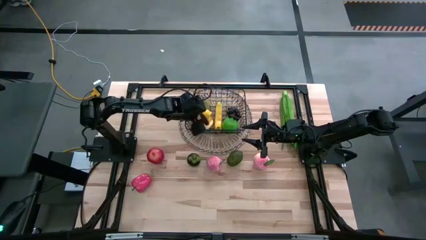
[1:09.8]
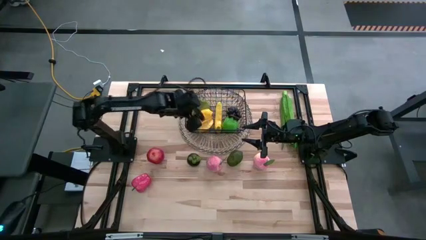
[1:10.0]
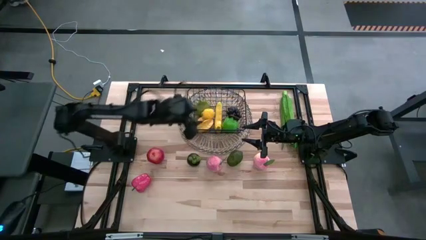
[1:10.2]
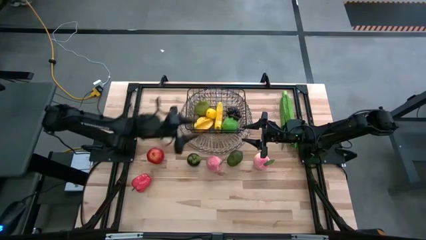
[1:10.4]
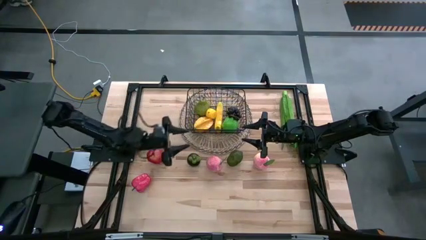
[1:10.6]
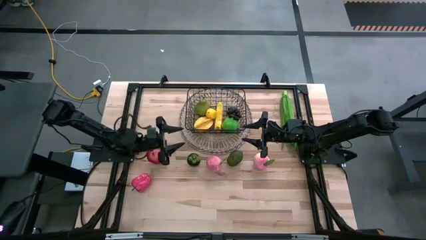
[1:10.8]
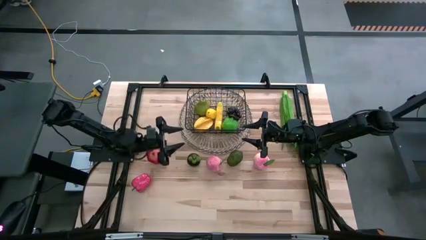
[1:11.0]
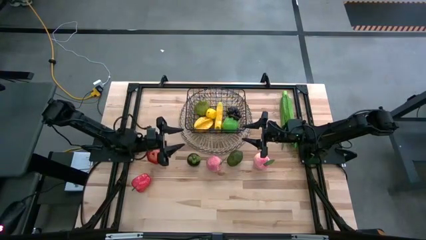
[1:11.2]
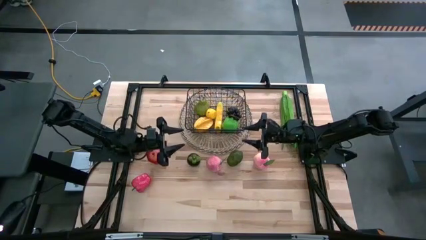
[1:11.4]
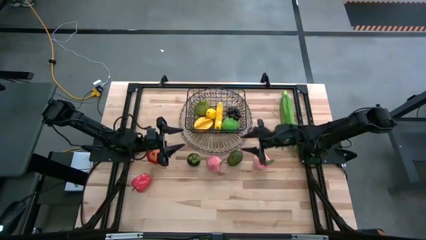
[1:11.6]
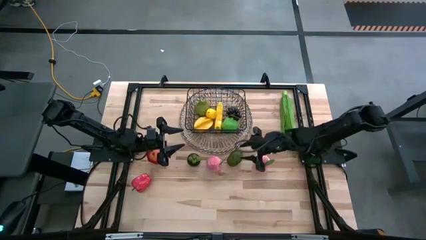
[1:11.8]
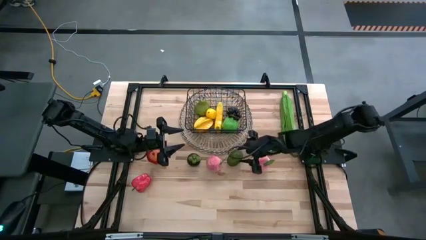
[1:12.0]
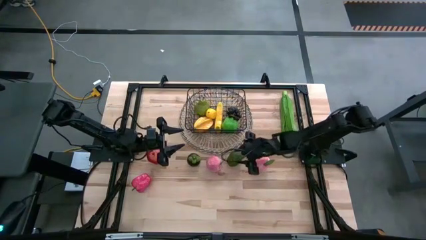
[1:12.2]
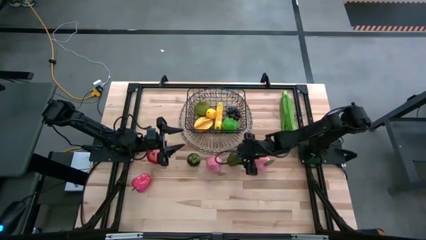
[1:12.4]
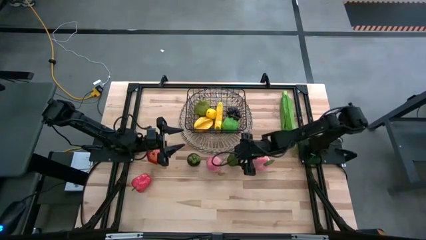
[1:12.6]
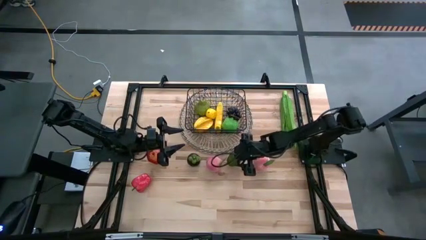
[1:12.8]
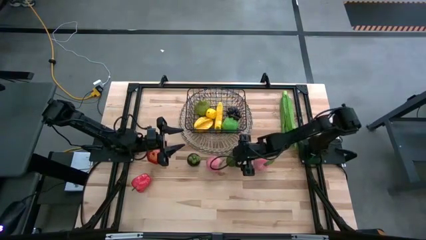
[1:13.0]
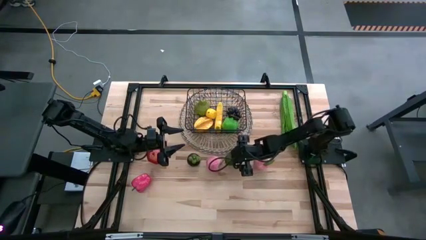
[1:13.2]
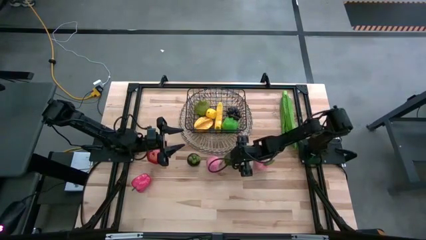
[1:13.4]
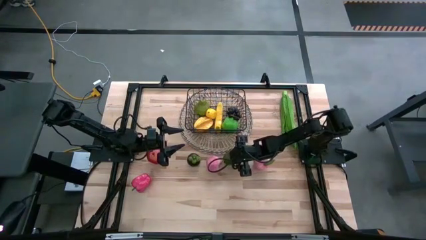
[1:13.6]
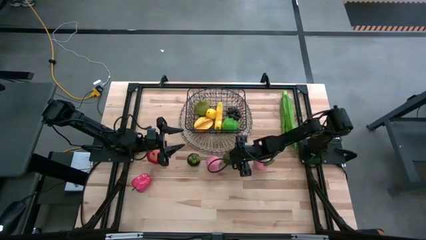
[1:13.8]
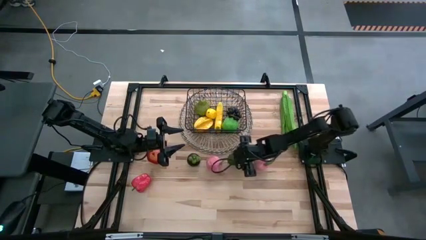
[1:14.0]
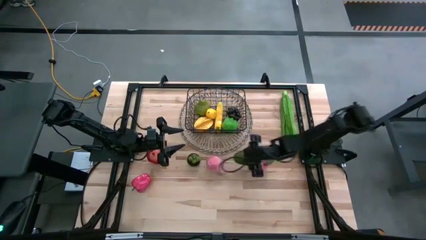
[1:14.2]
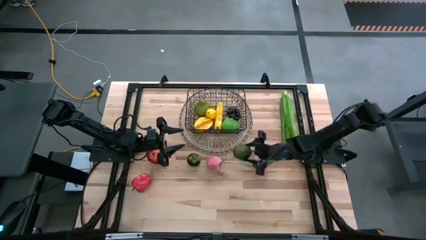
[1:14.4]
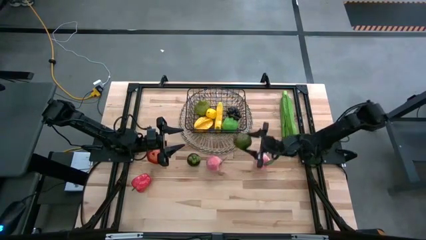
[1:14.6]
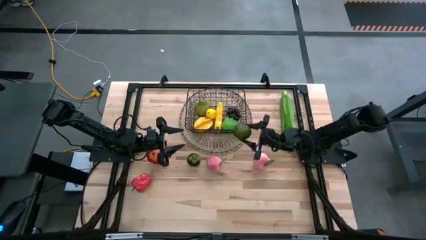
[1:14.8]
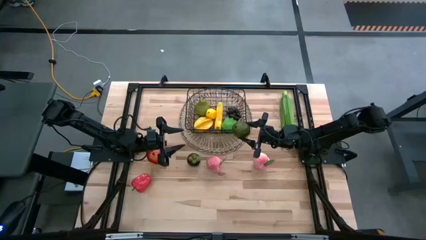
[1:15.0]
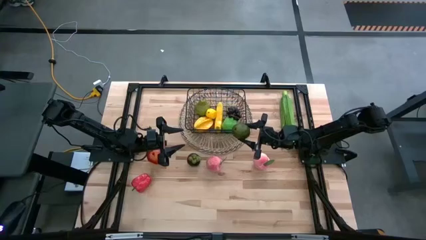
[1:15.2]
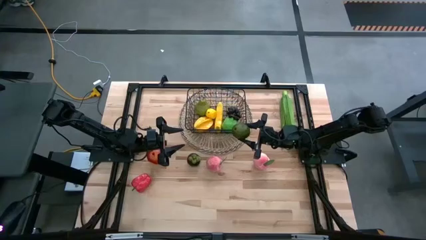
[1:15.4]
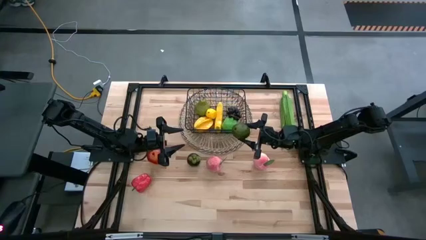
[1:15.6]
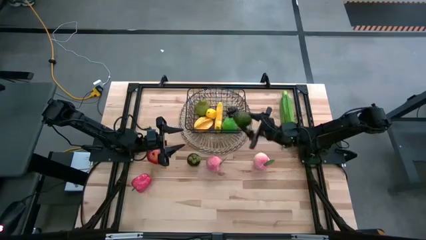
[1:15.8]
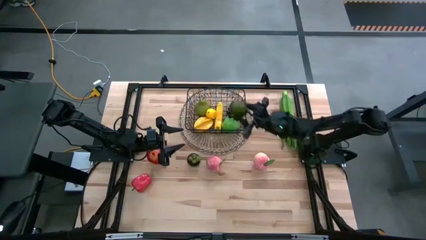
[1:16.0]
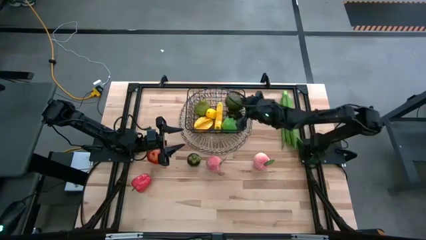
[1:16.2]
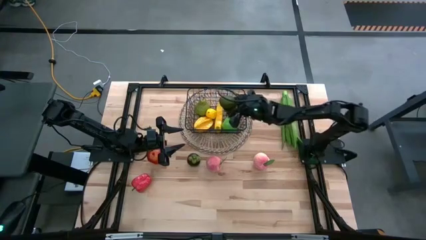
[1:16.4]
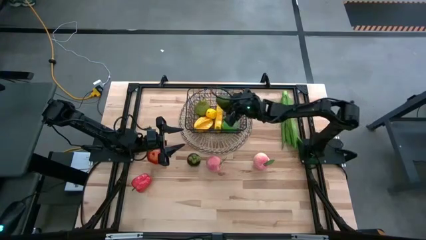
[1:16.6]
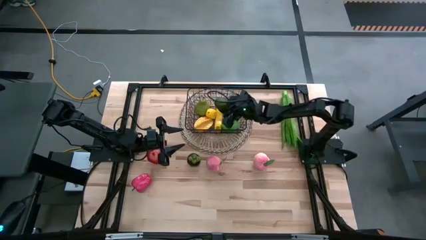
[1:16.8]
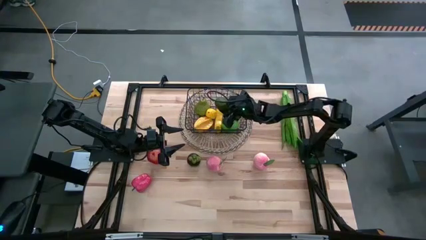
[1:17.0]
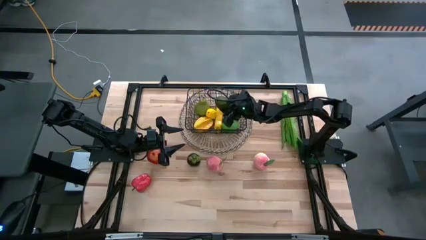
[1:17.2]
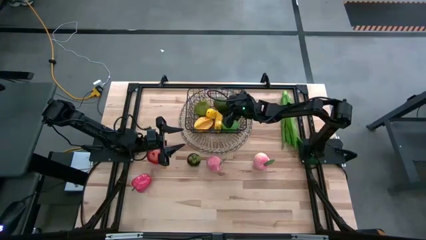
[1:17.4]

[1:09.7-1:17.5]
Task: Build produce basket
Put the lime into the black wire basket

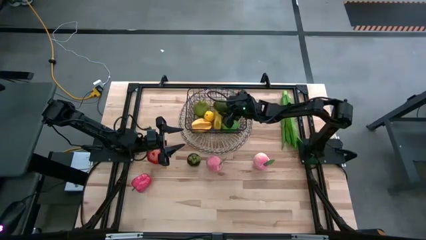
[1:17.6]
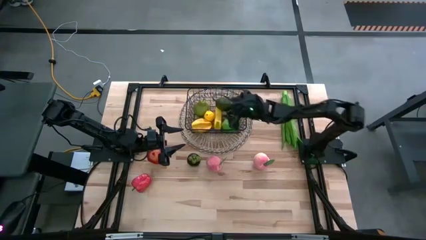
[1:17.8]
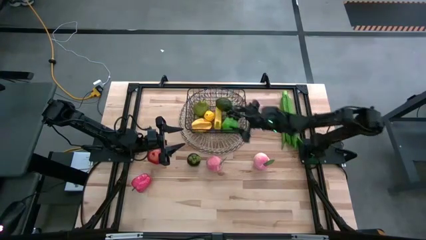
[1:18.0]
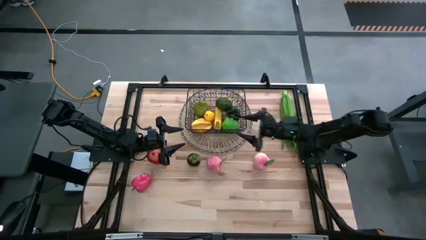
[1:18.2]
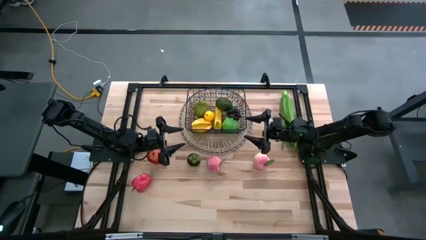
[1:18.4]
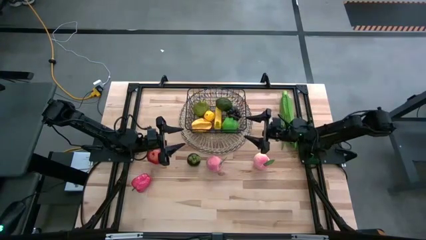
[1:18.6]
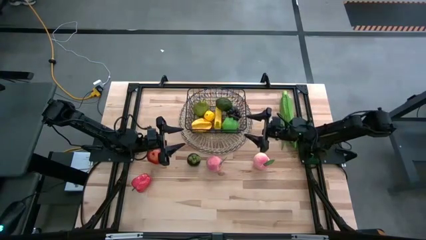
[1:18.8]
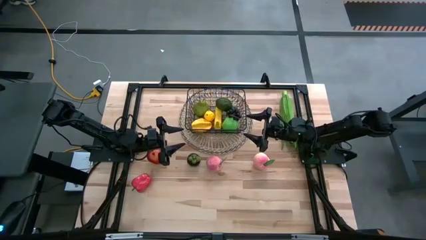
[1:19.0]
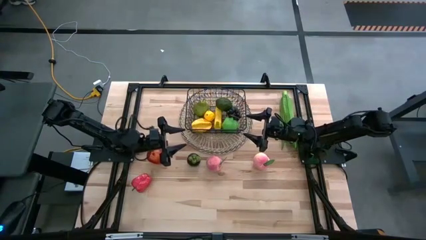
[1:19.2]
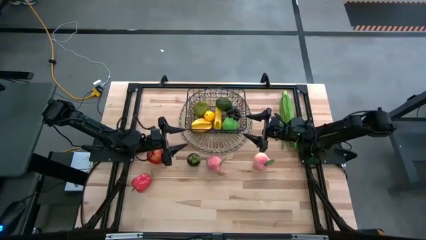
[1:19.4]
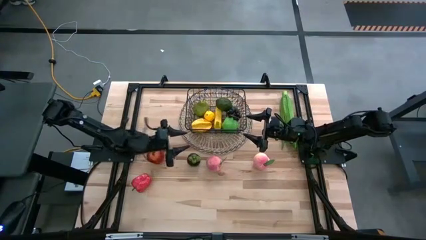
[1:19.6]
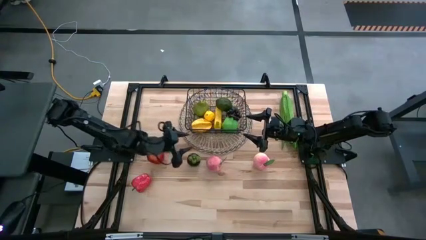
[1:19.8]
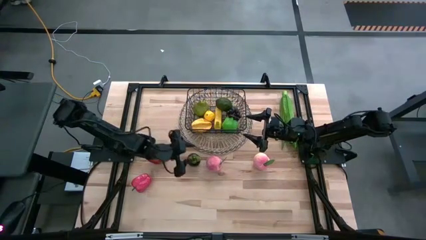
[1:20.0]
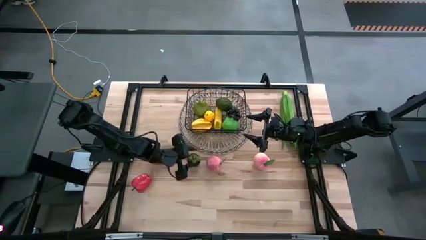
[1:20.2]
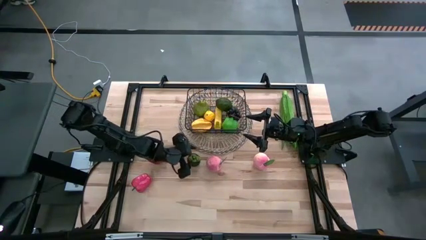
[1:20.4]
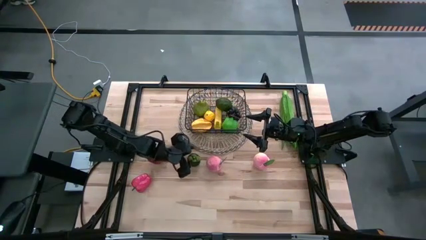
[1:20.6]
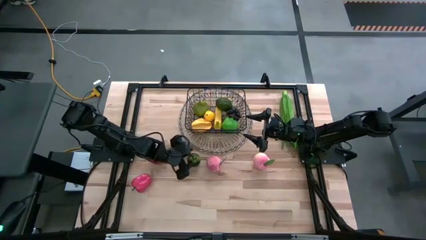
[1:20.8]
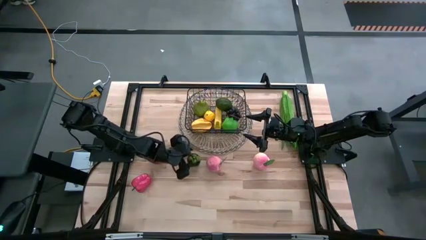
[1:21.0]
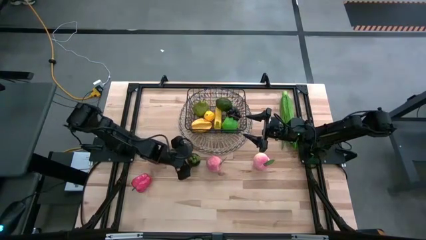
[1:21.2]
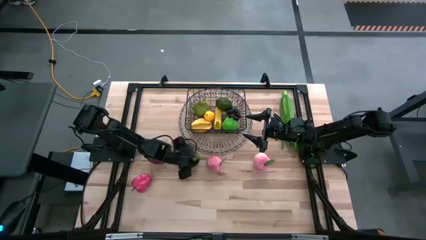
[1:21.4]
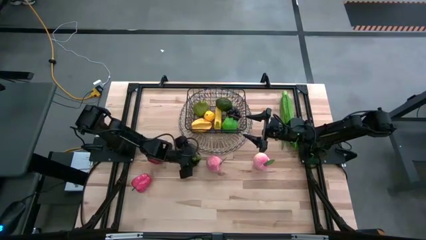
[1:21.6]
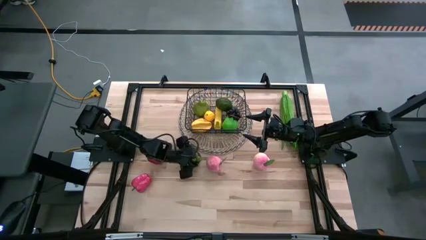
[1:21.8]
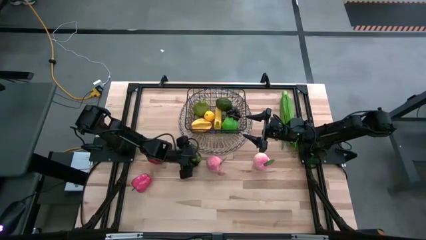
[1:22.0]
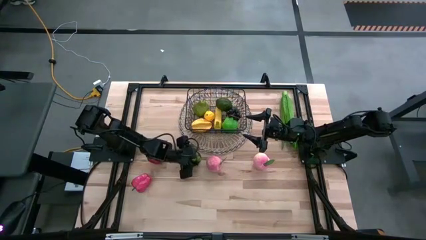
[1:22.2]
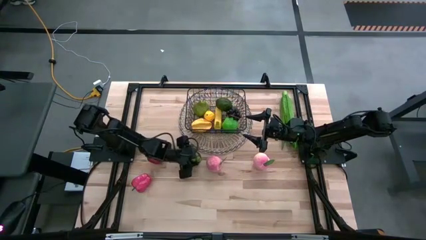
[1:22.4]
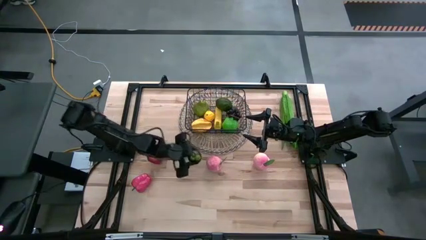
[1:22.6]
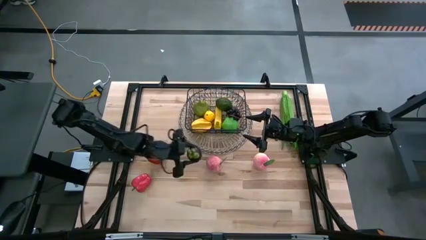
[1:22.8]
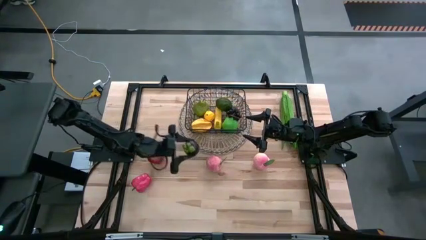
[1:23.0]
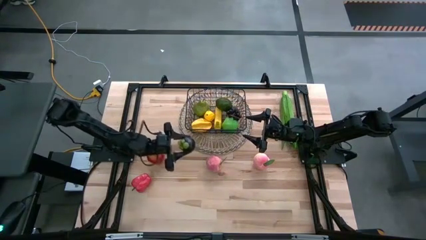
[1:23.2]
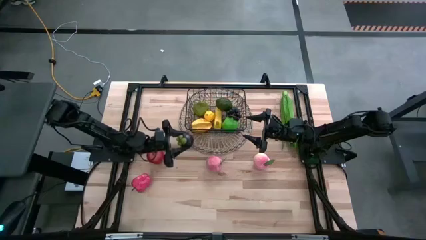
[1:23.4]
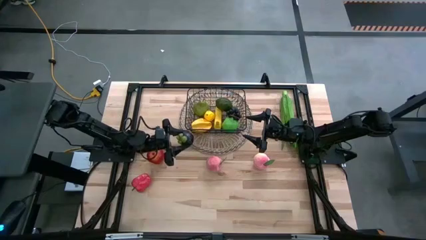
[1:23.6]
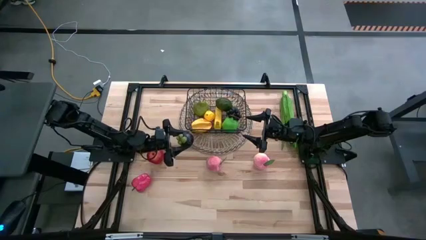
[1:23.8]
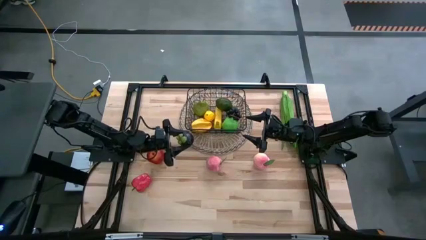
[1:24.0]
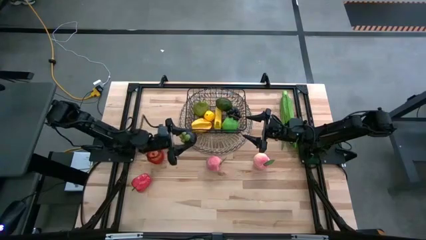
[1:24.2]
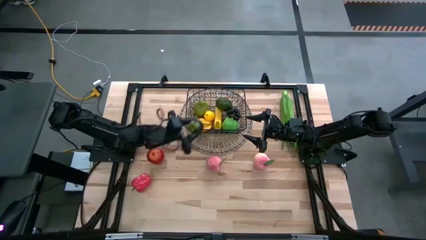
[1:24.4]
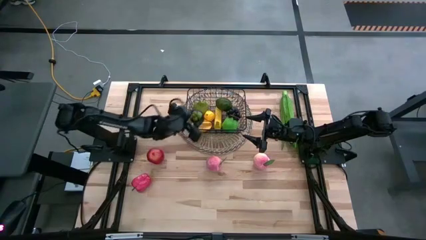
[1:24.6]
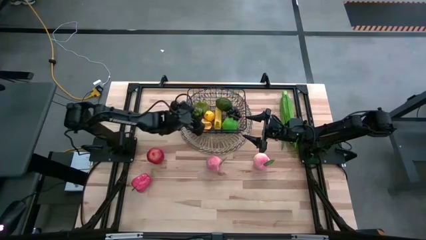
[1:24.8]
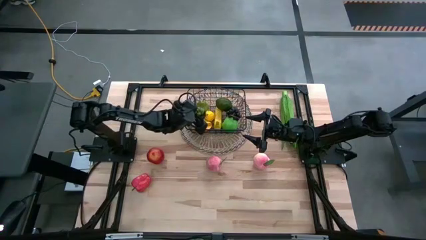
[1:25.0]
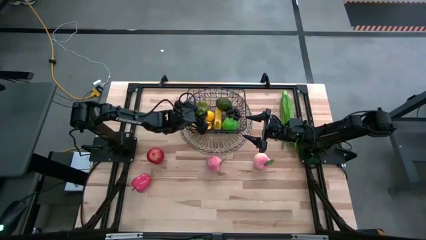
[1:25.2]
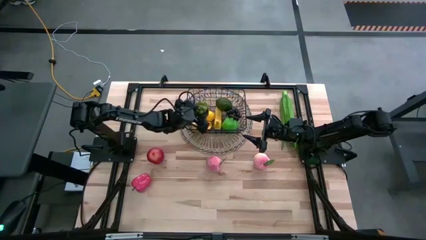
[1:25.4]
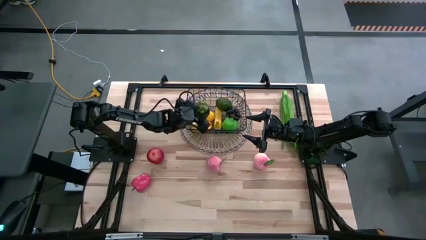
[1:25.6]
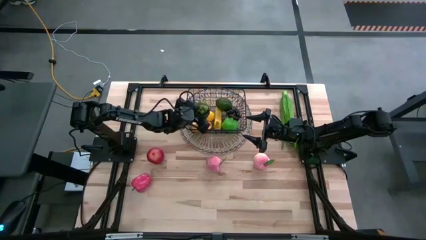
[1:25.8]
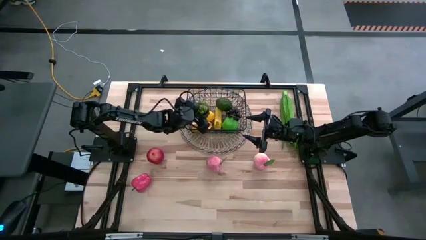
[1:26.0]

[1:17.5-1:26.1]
Put the mangosteen into the black wire basket
